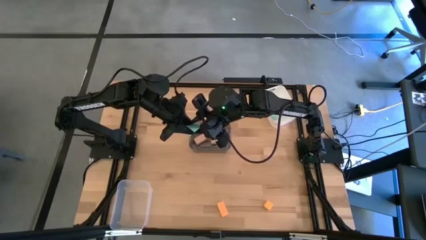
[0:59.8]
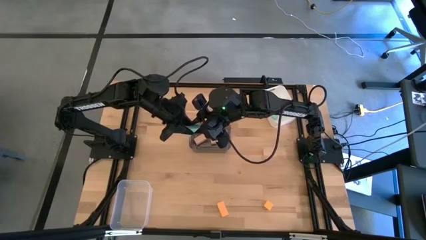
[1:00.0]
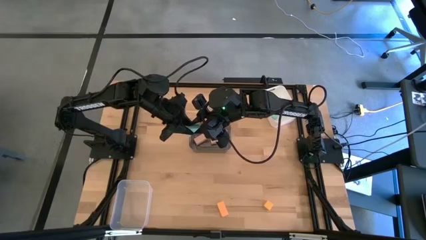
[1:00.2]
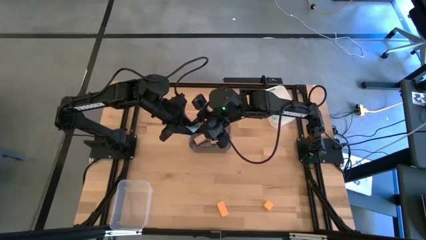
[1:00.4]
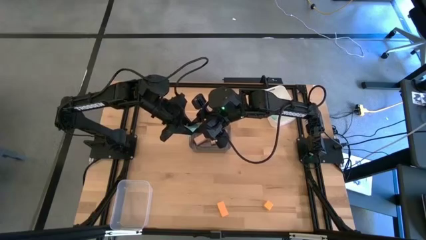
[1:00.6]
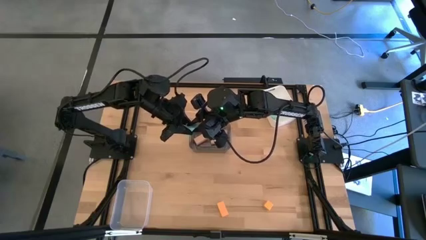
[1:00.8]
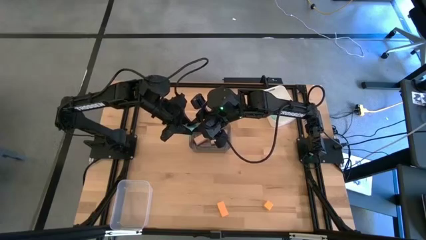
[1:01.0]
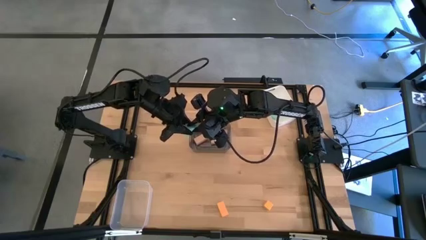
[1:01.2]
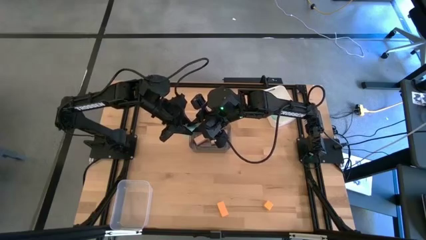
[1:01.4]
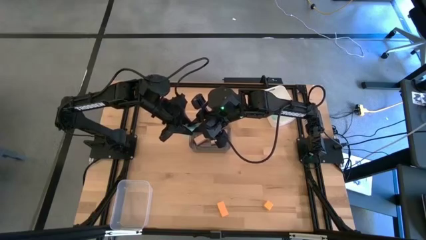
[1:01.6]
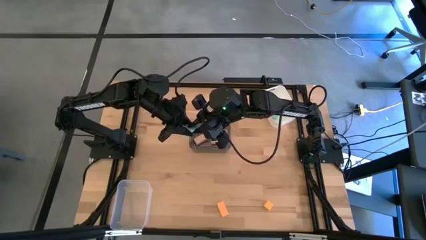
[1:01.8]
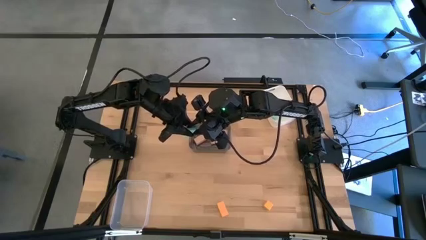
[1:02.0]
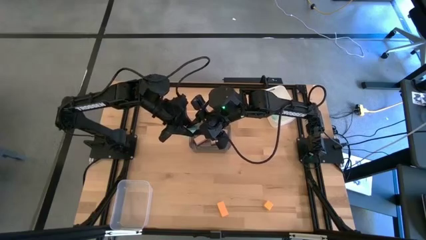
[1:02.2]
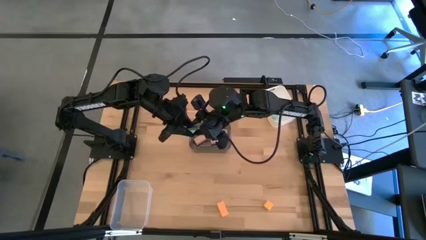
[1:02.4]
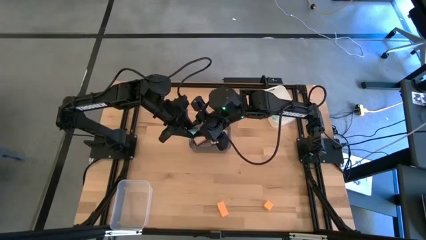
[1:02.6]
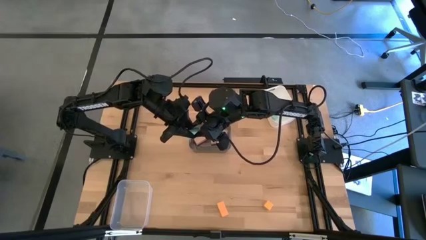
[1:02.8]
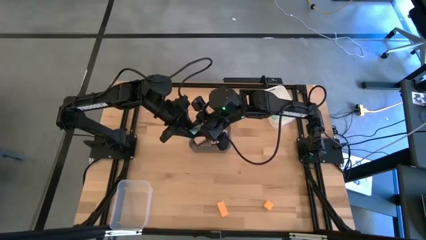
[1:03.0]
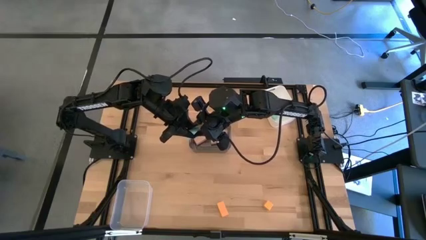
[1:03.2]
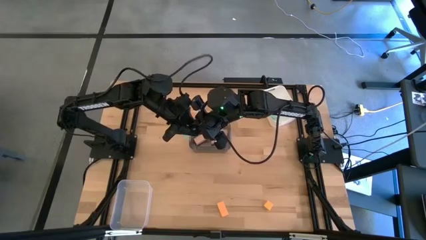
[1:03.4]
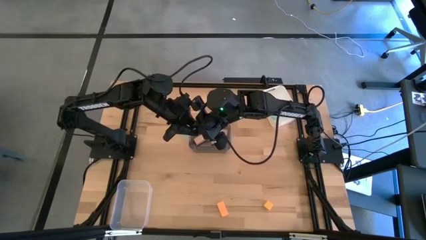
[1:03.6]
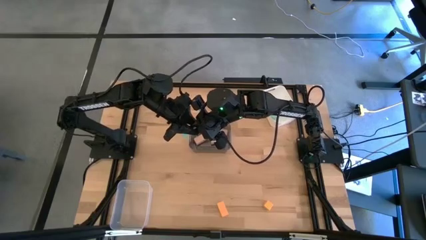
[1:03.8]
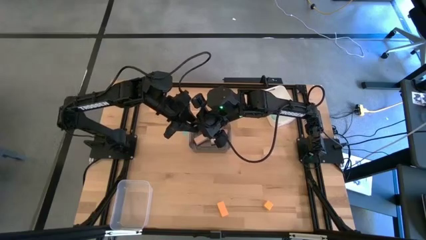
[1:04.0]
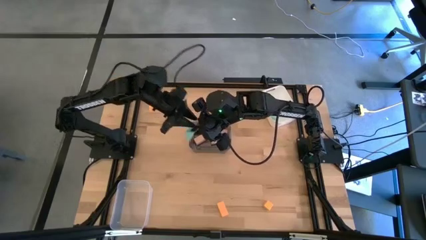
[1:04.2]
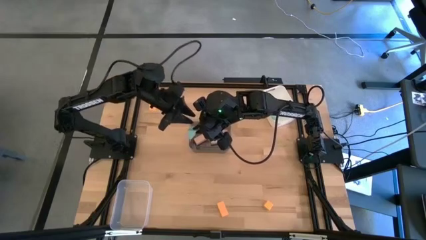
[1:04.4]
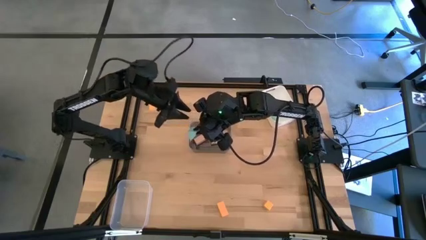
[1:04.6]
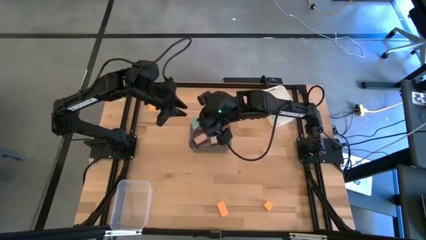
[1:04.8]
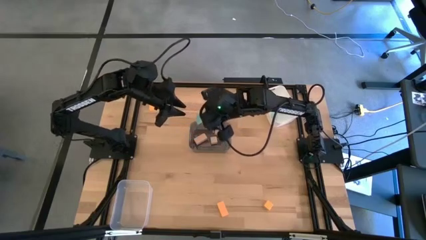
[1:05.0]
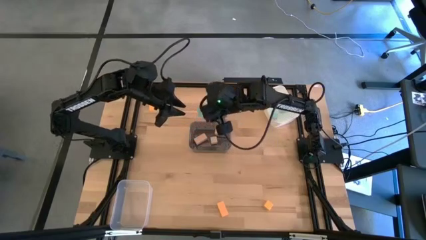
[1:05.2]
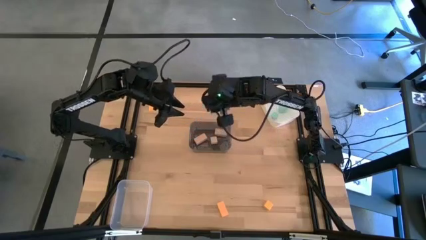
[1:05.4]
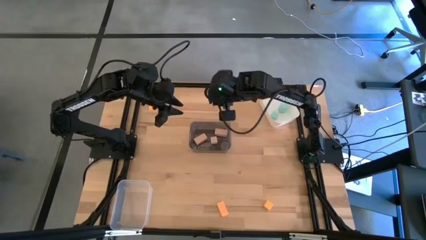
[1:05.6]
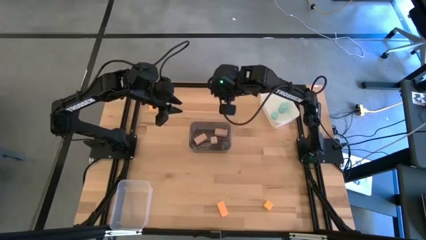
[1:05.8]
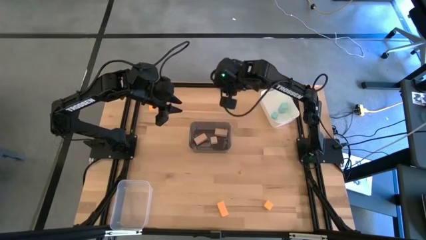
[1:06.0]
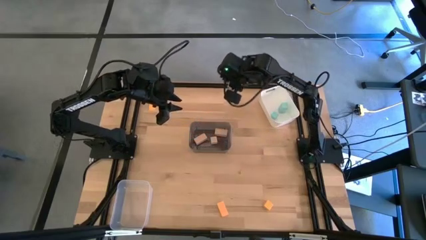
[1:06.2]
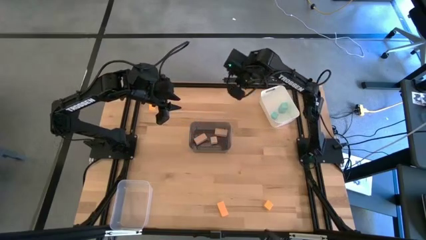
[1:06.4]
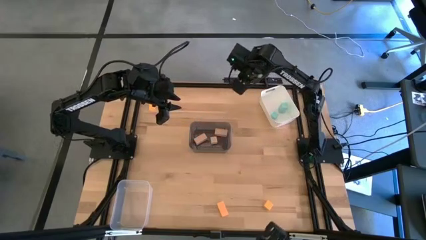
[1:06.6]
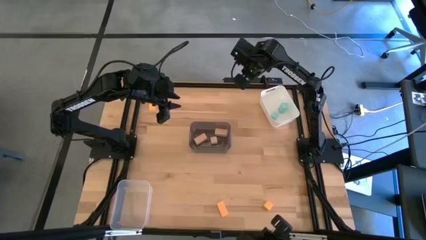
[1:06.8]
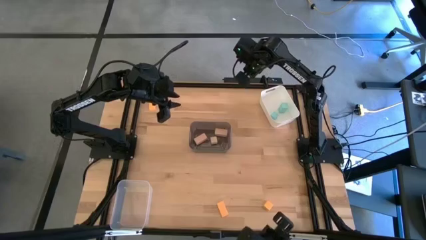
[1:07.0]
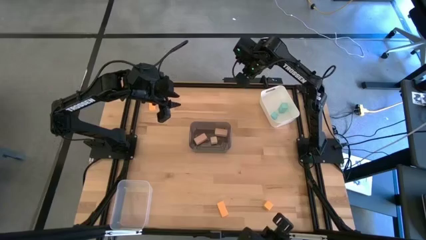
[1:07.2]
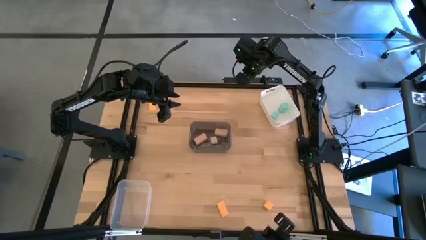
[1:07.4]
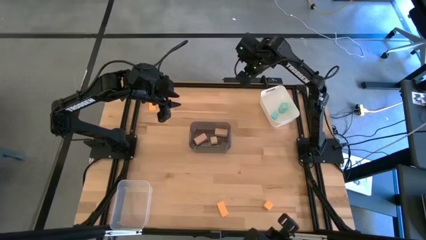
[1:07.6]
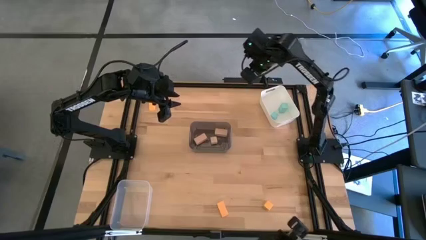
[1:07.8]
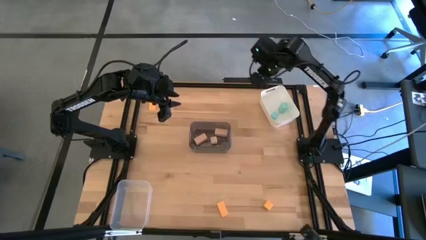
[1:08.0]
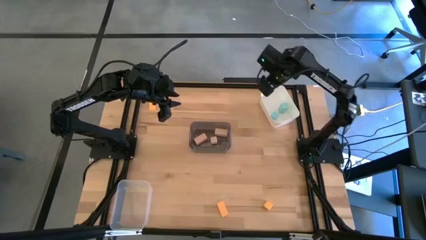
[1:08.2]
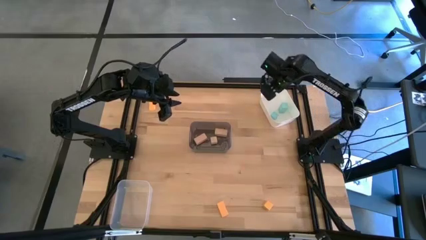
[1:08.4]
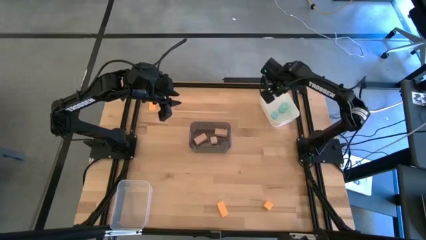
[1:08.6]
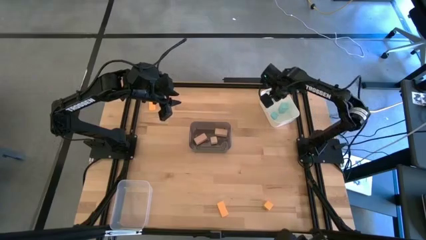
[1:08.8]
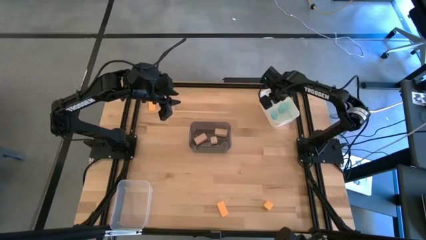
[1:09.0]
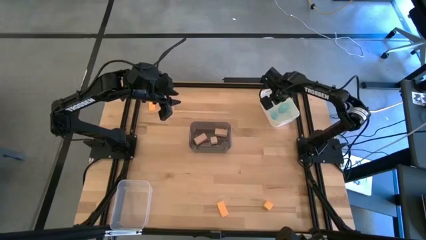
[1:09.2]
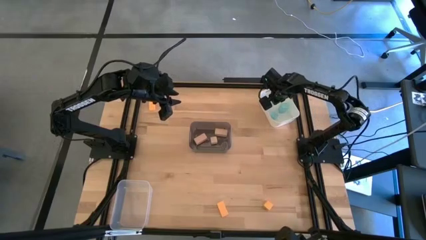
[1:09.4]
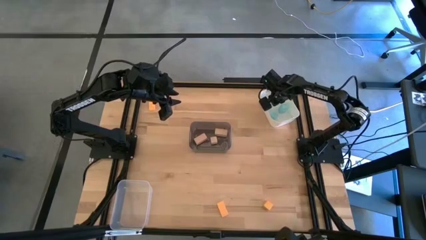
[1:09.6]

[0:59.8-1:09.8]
Task: Sort & place blocks by color
Put the blue block into the white bin
